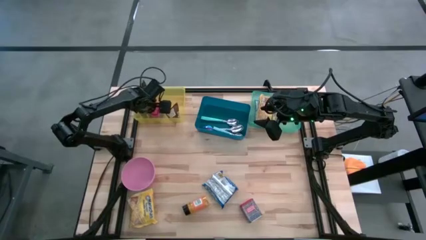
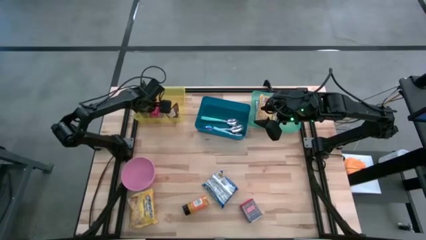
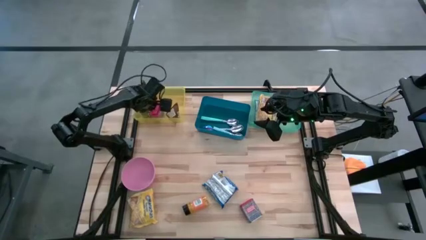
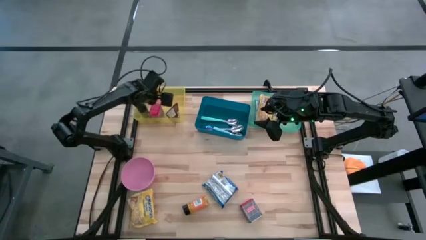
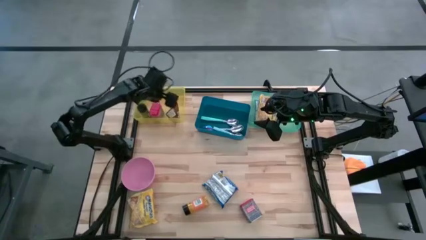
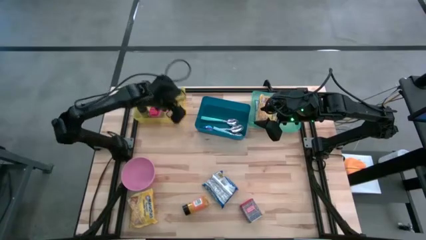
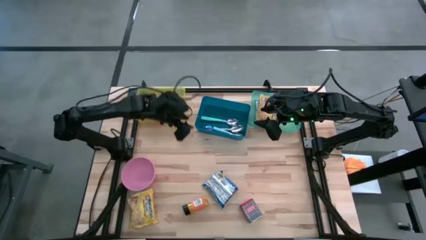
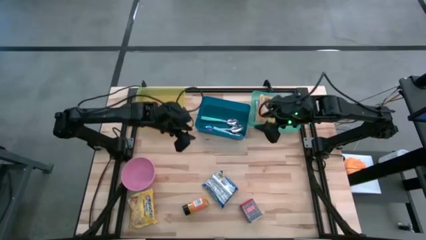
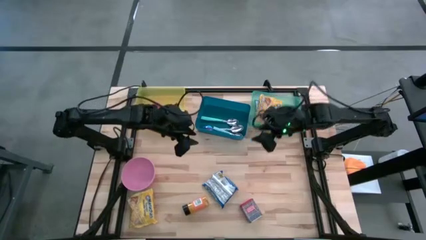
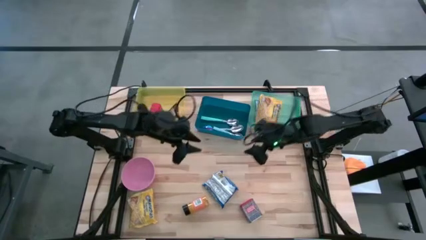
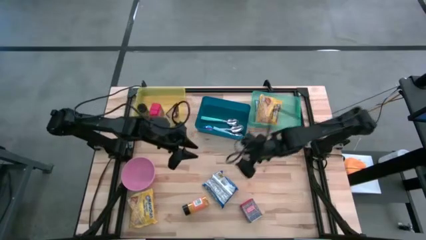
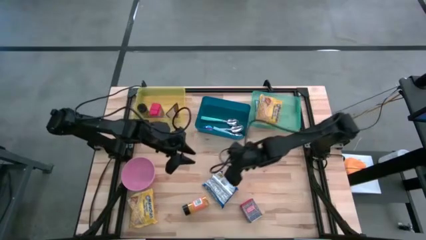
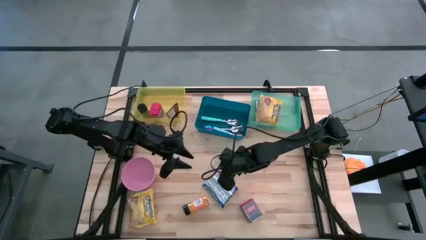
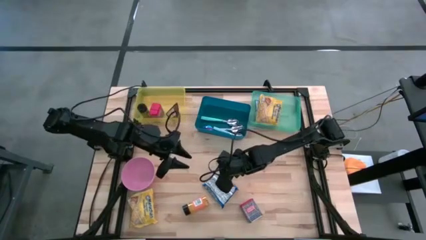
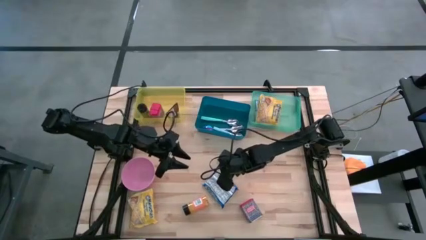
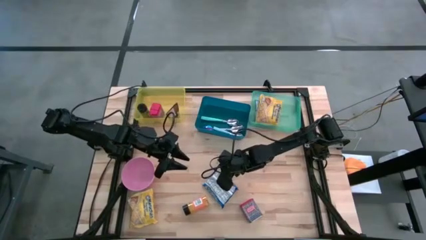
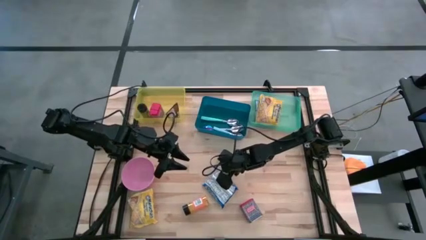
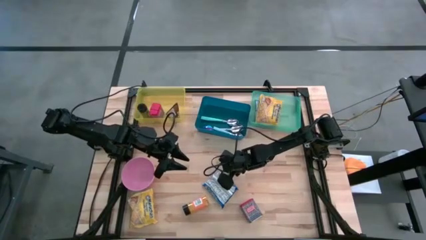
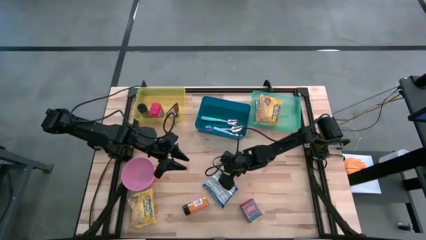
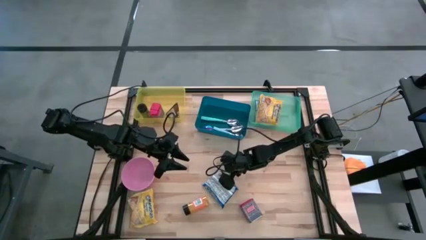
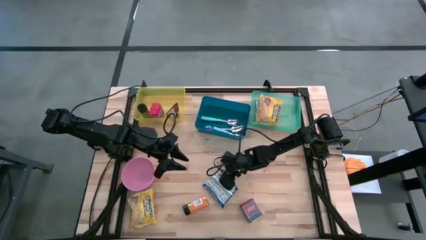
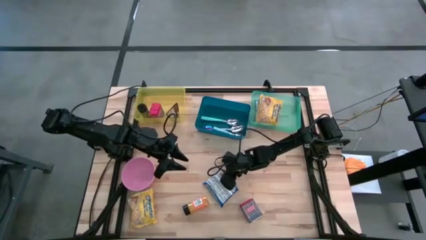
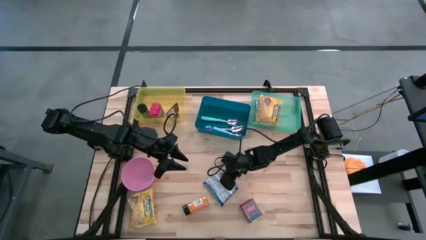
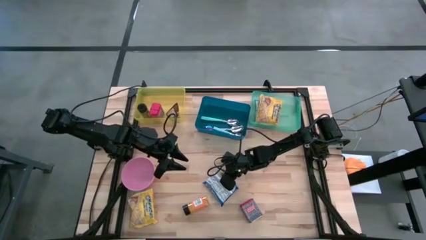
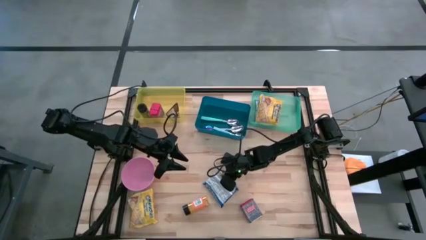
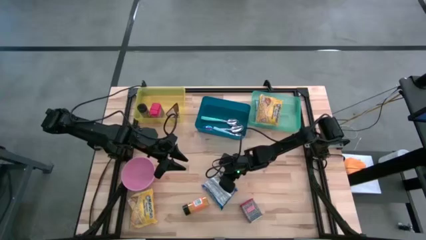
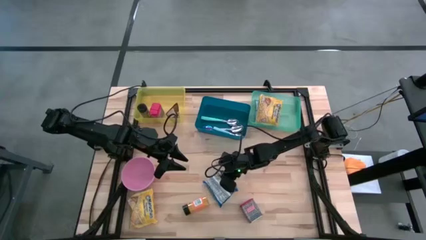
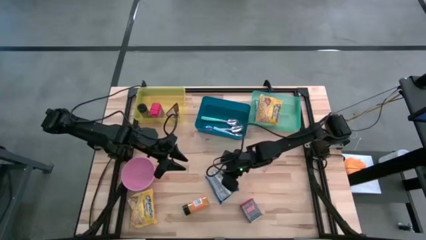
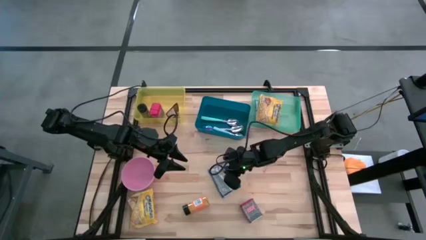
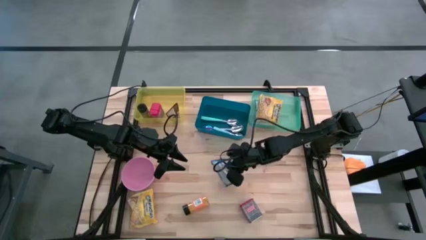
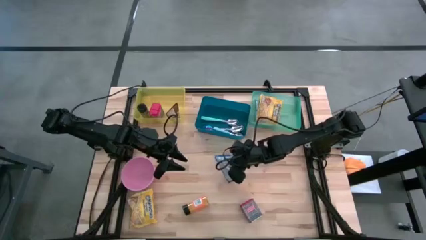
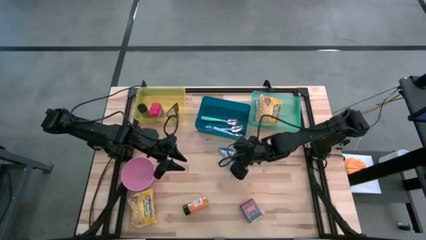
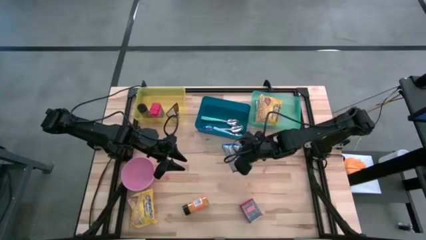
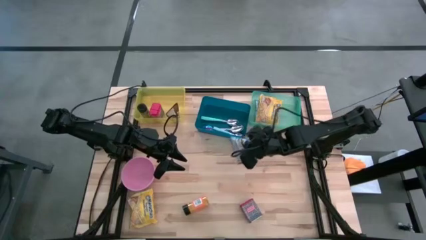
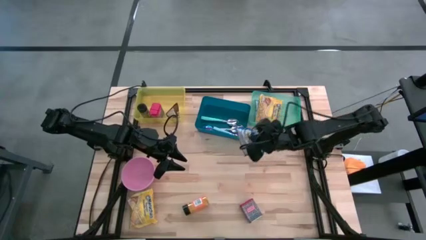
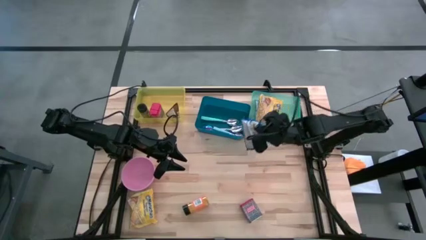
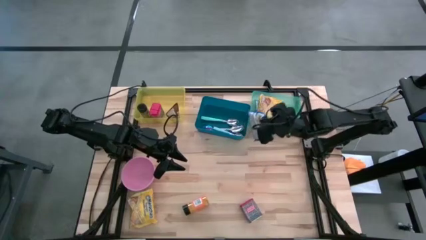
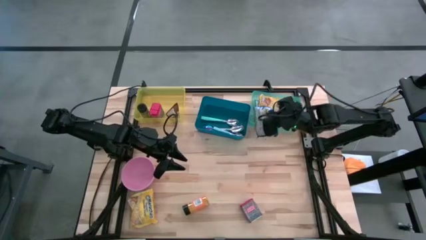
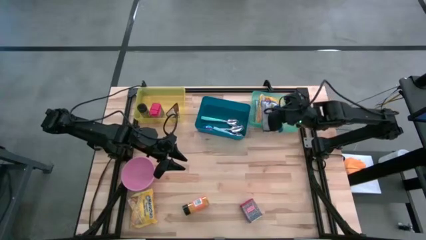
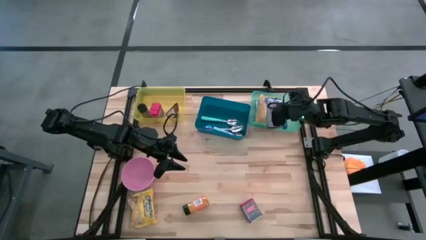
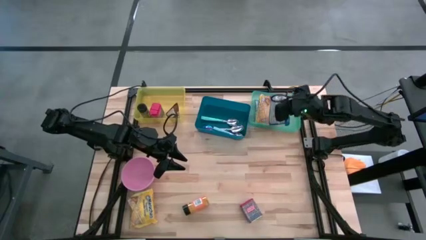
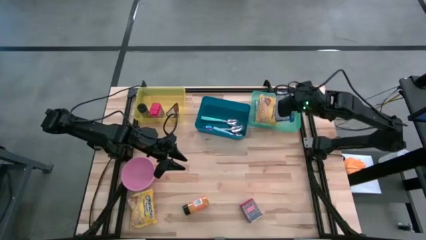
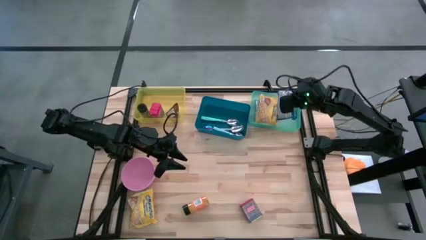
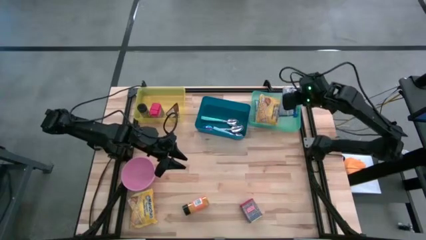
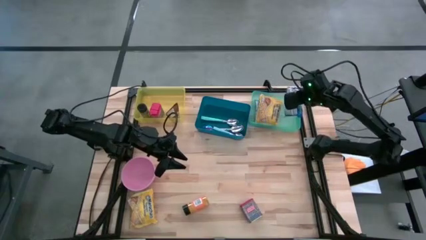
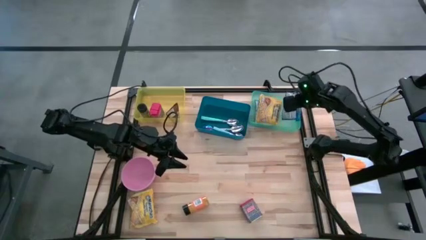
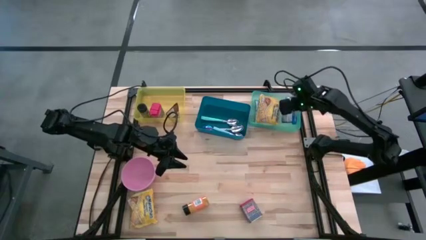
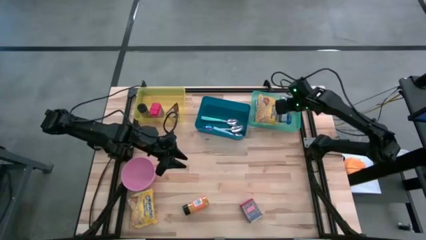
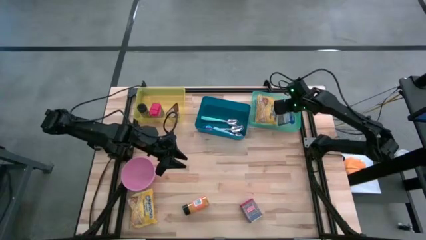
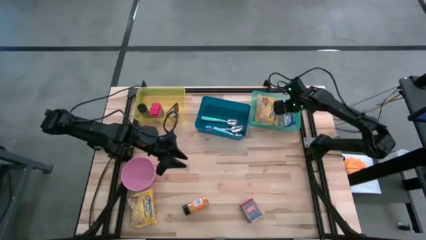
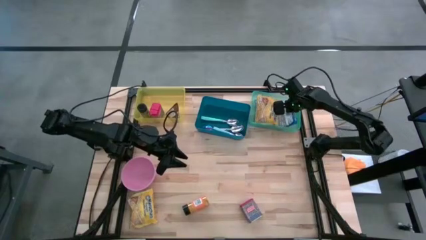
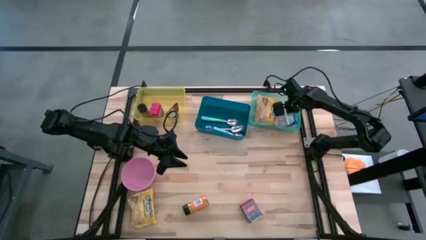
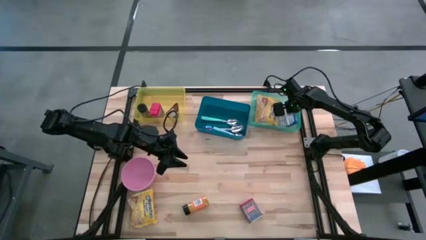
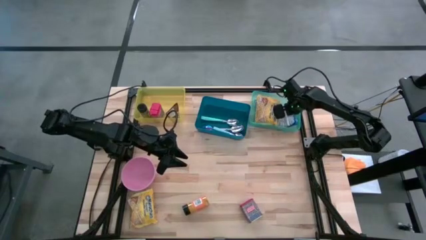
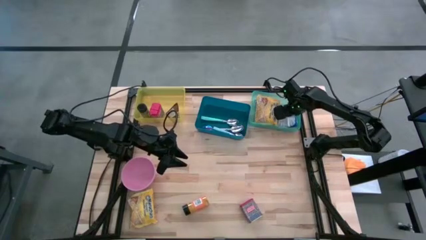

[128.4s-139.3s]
Put the blue noodle pack into the green bin

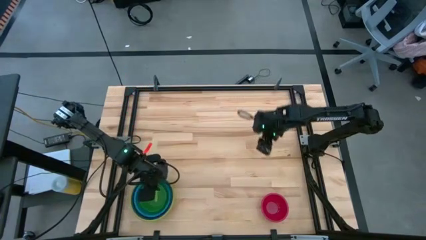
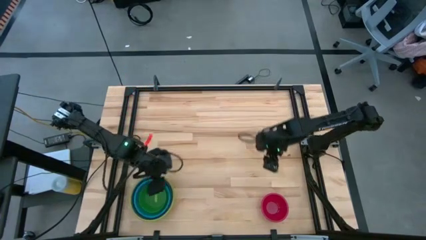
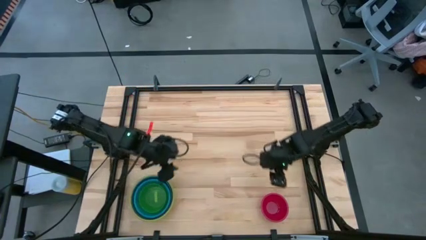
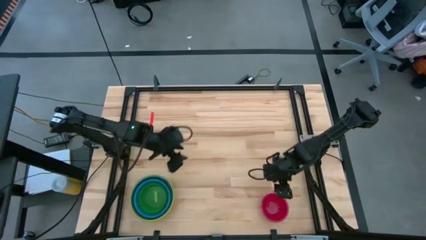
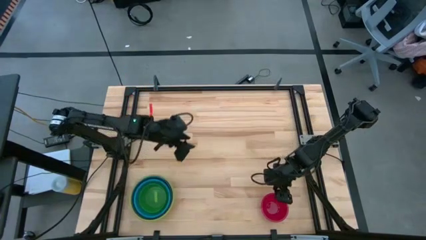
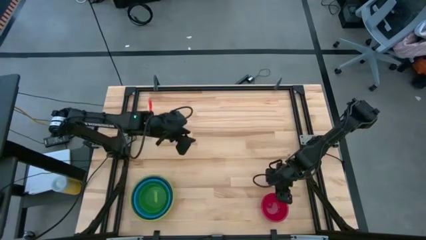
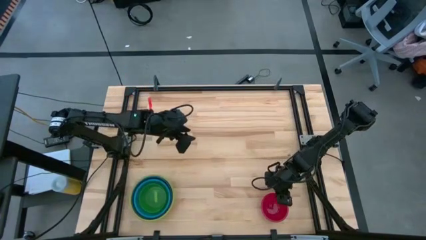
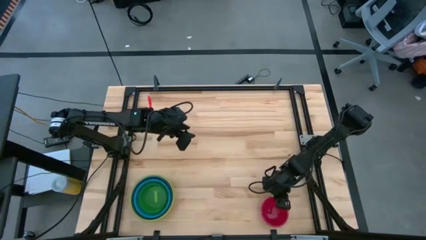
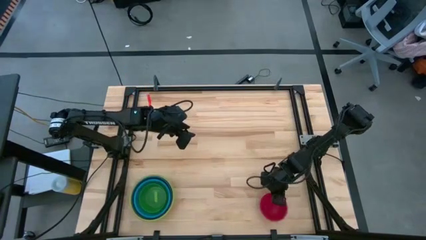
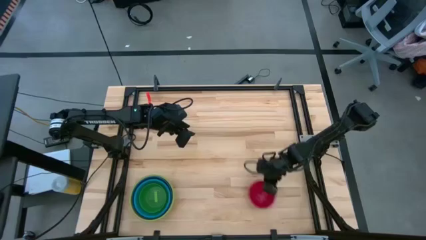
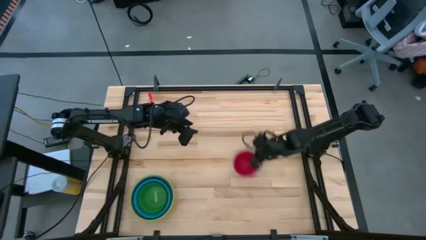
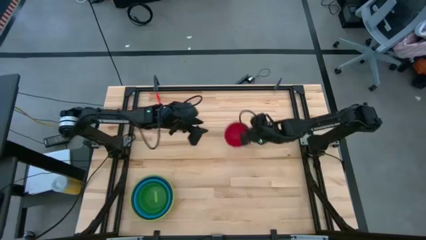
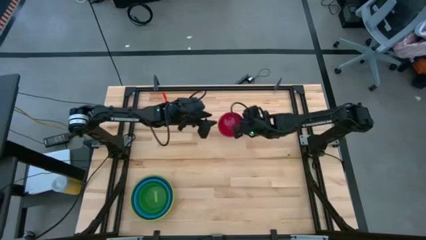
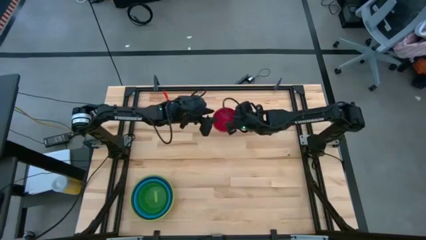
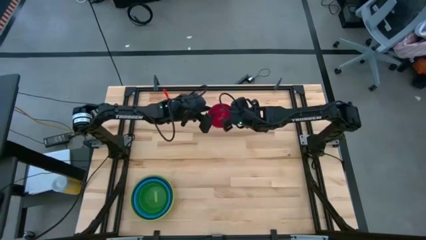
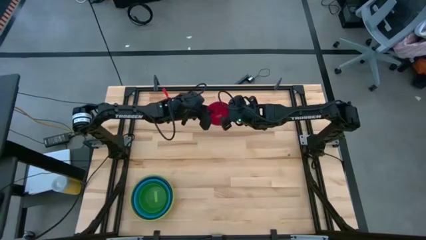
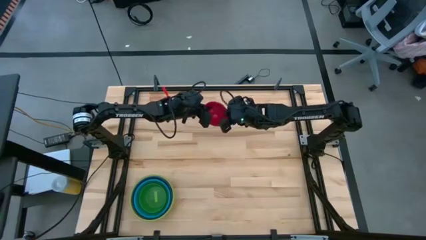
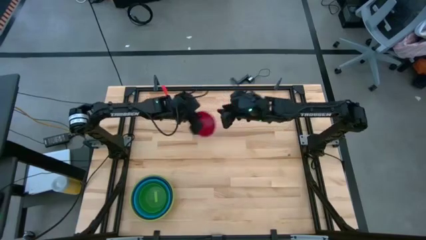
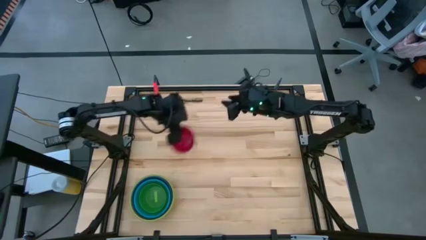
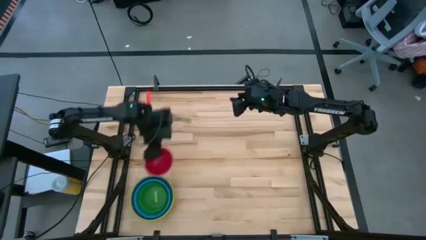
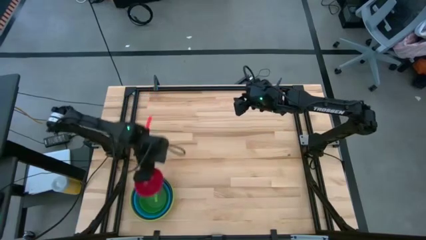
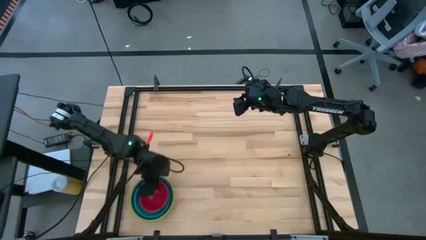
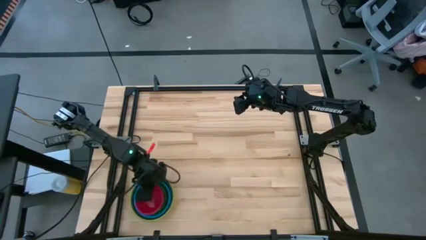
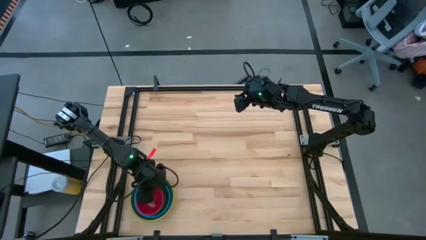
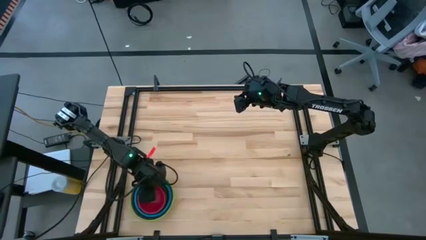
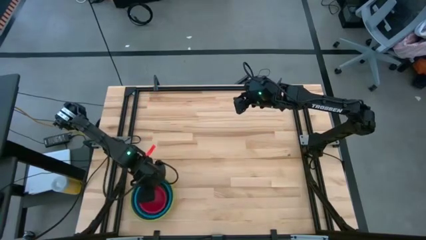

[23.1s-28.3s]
Stack the red bowl on top of the the light green bowl
